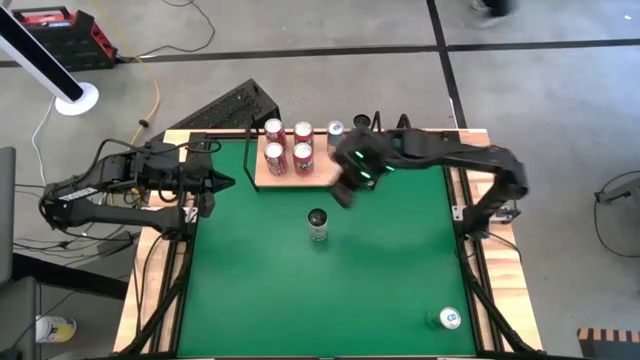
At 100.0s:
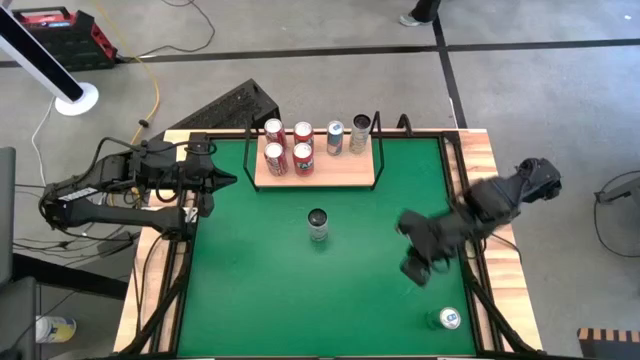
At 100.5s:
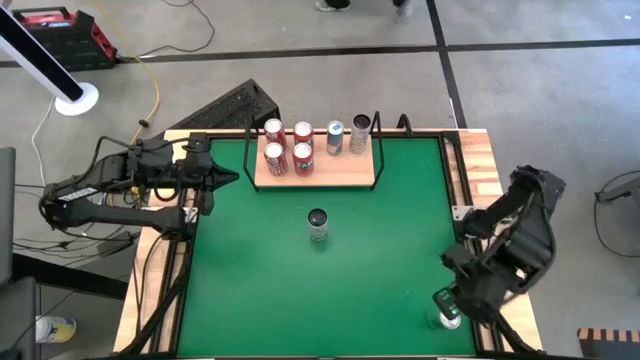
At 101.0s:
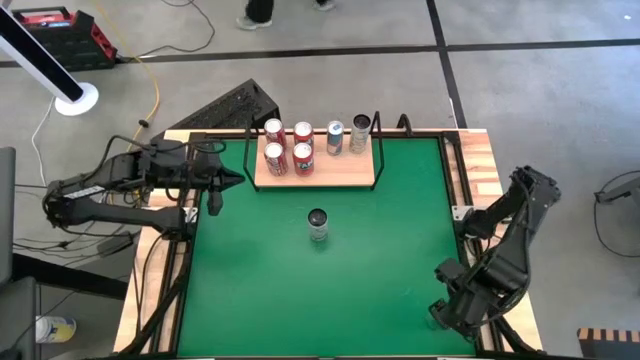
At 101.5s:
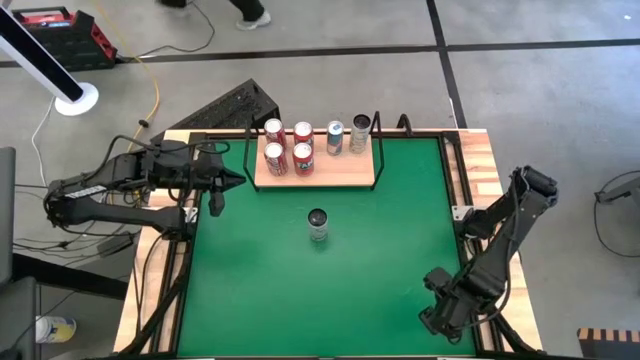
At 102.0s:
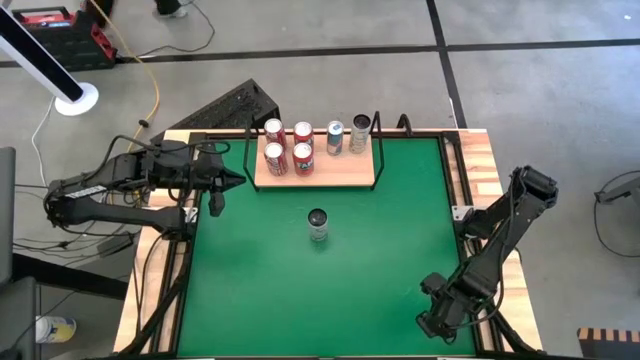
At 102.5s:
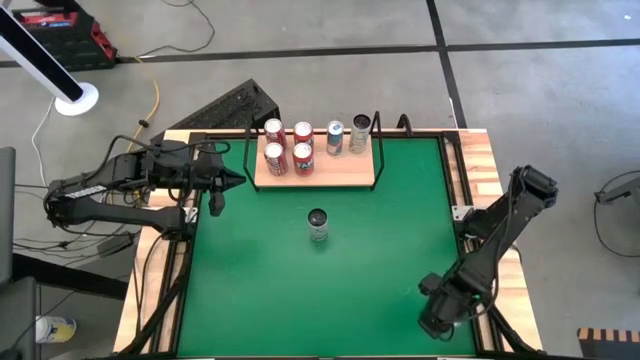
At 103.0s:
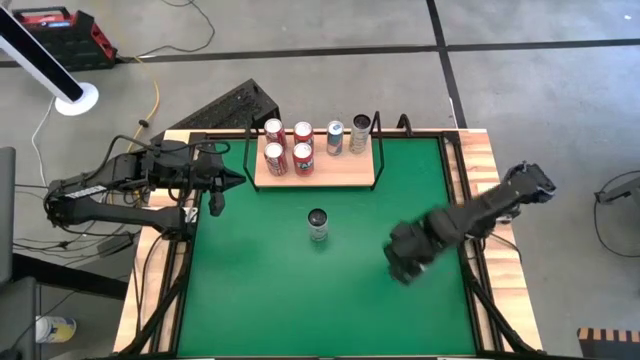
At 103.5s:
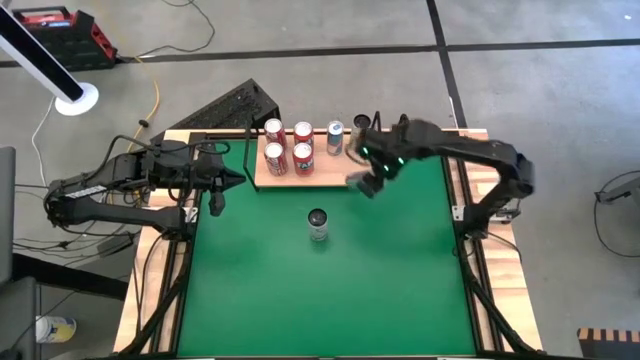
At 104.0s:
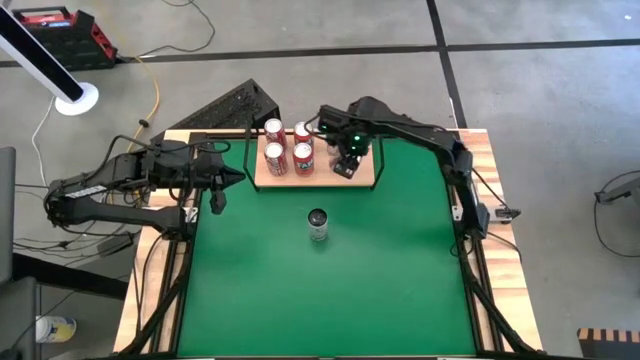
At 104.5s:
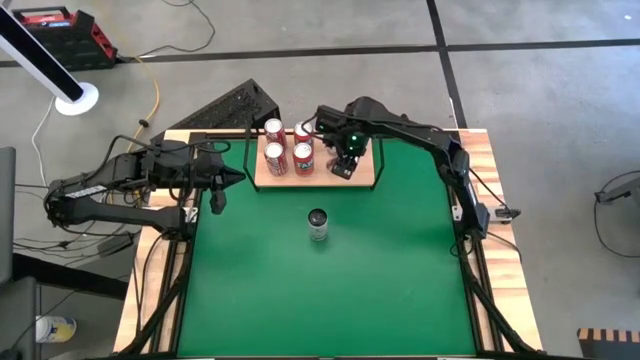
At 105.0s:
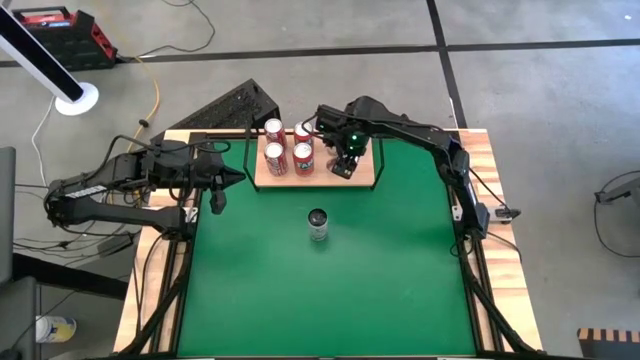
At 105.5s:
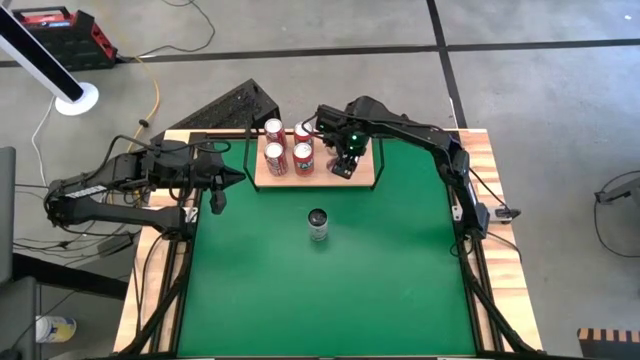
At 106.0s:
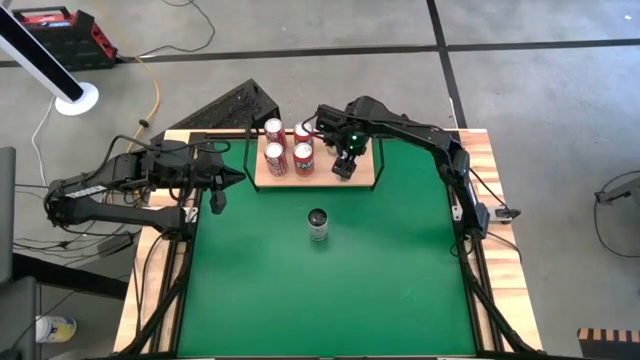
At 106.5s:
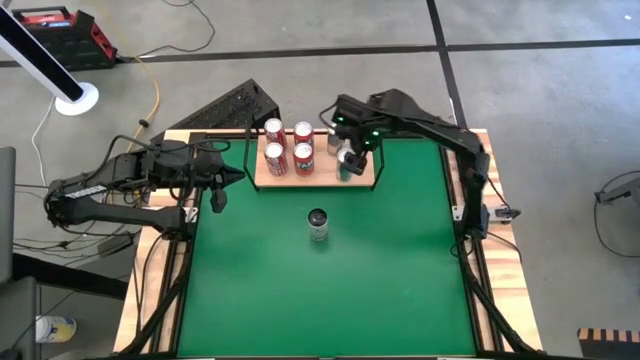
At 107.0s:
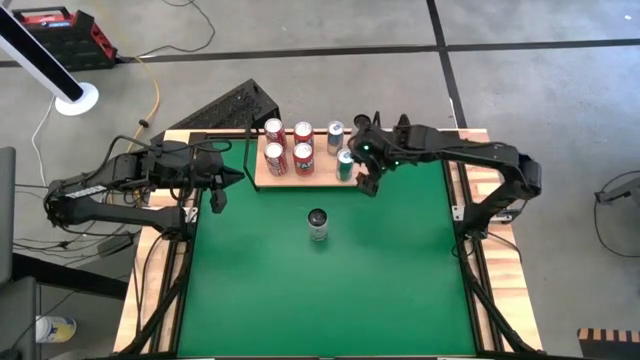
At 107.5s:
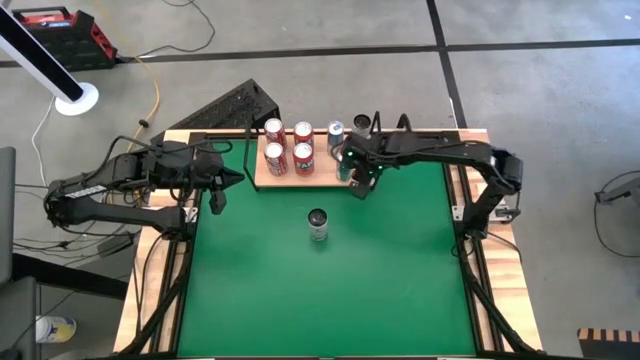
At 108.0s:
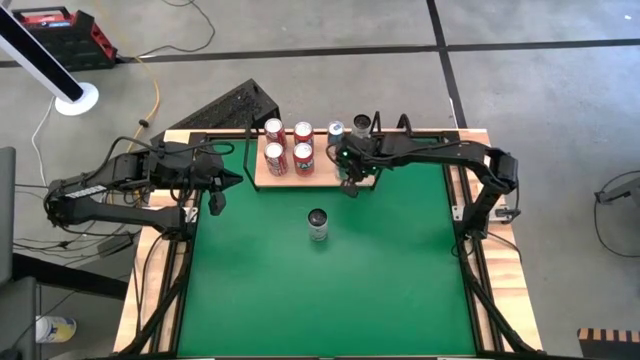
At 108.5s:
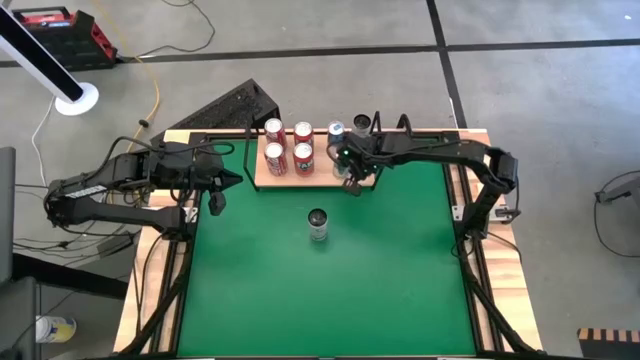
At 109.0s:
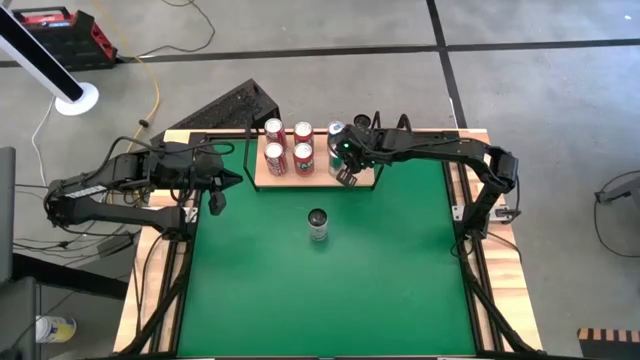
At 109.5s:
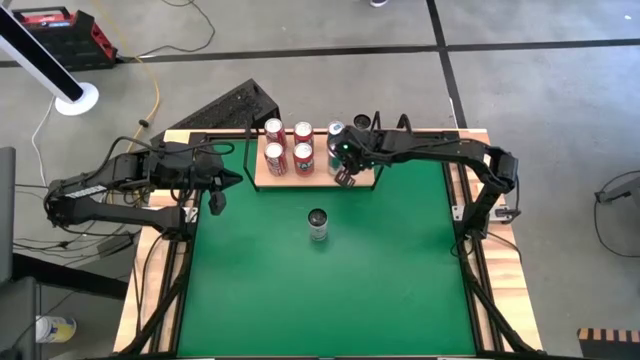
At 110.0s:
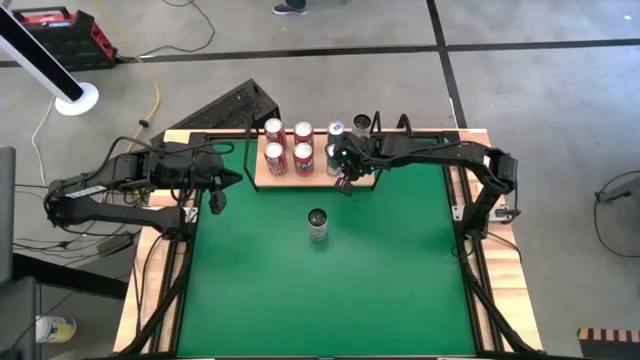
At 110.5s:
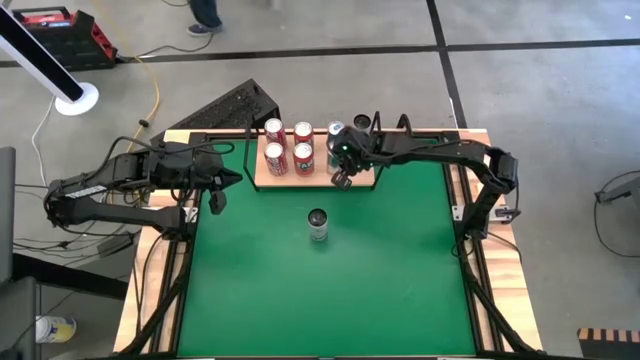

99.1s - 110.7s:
Task: Place canned beverage on shelf
Put the blue soda can on the shelf aligned with the other blue soda can

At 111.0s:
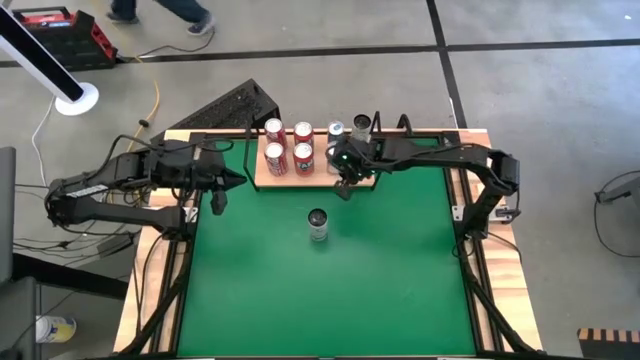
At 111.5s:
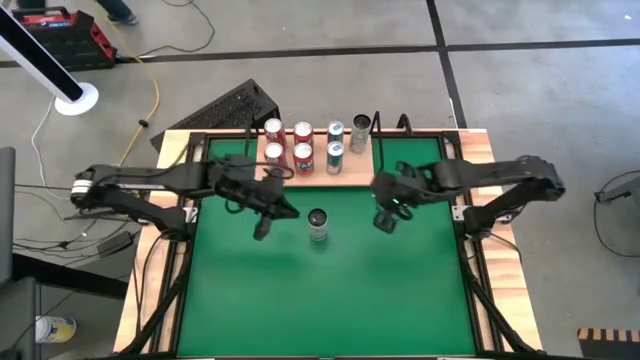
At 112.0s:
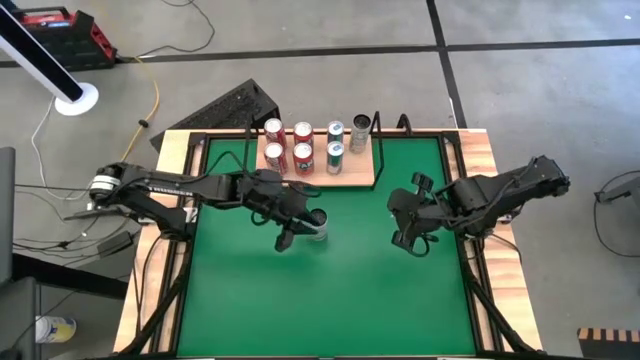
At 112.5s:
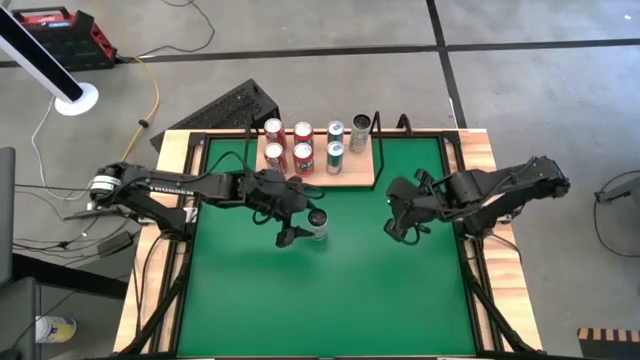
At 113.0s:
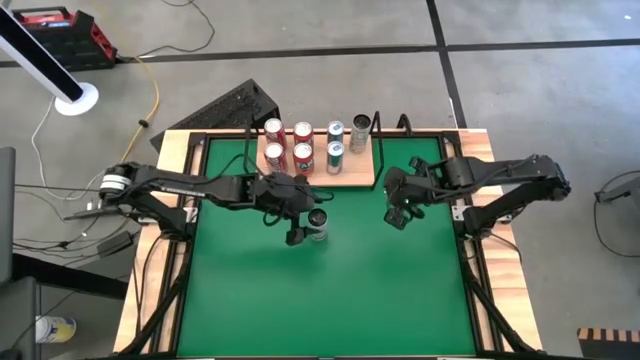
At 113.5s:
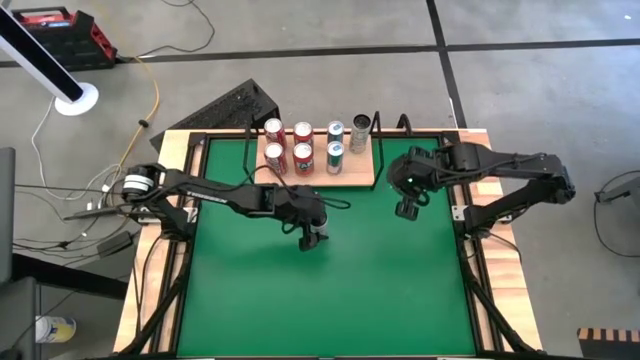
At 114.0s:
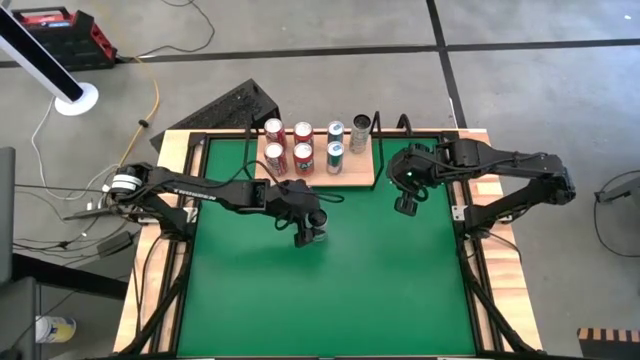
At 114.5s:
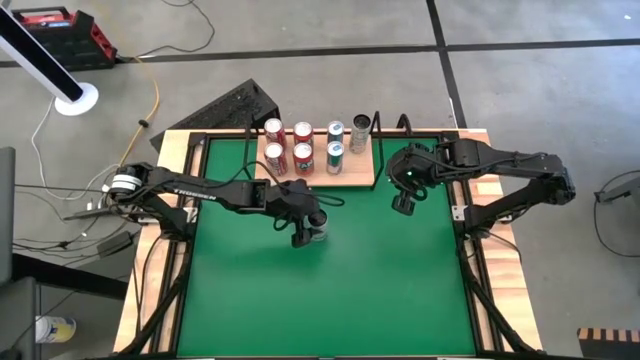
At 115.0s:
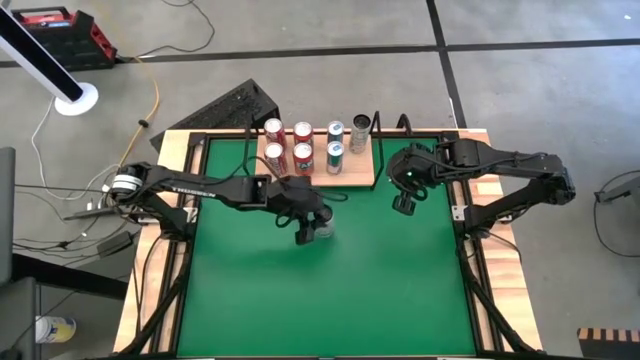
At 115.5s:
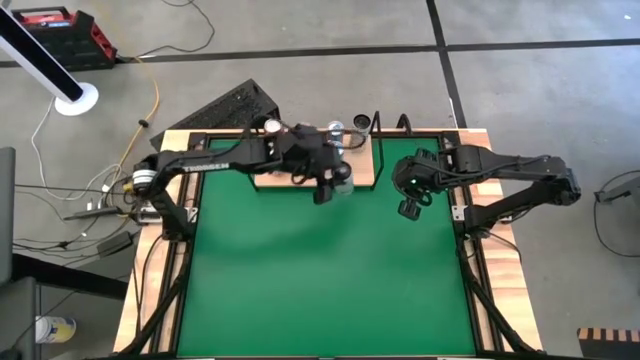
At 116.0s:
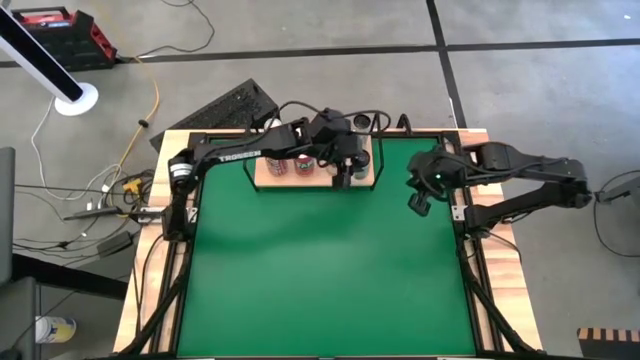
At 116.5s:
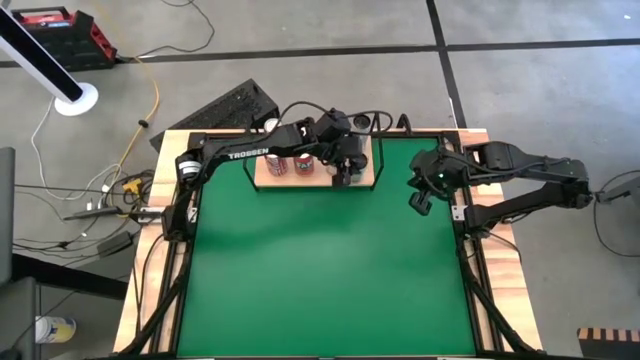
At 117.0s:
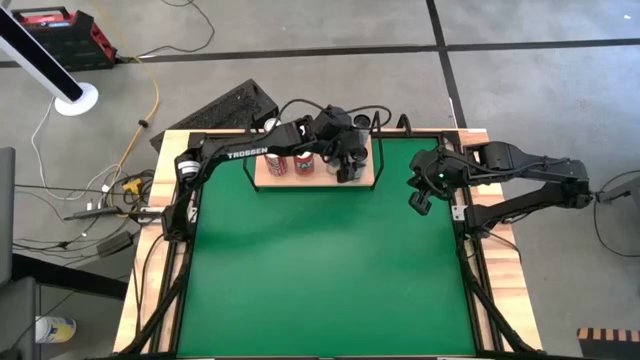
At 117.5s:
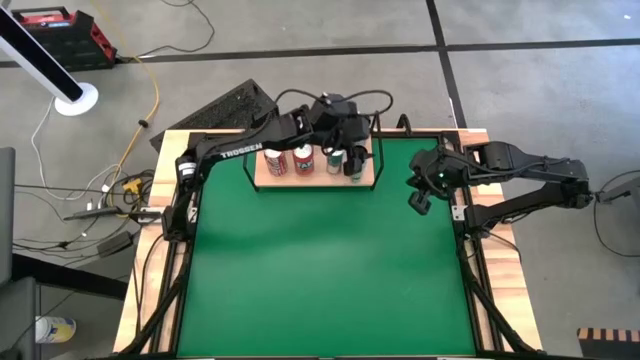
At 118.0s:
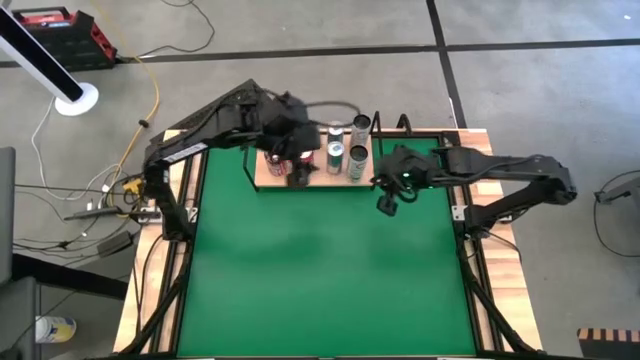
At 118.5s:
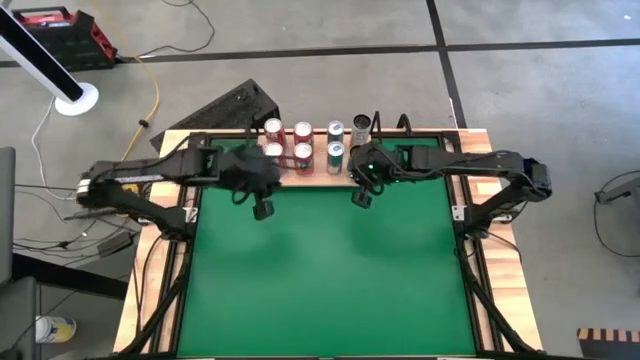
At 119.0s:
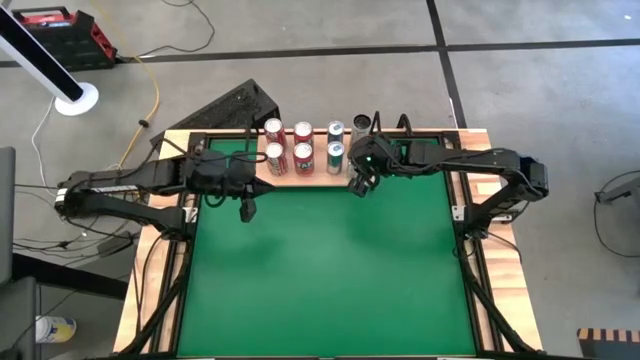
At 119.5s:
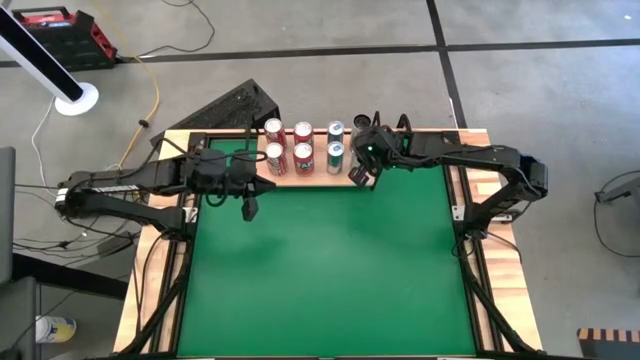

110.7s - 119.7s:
Put the white-yellow soda can on the shelf aligned with the other white-yellow soda can

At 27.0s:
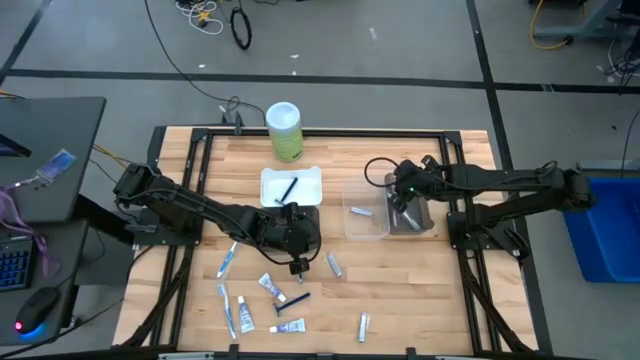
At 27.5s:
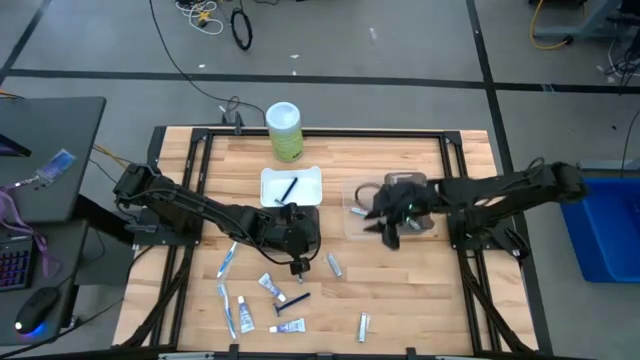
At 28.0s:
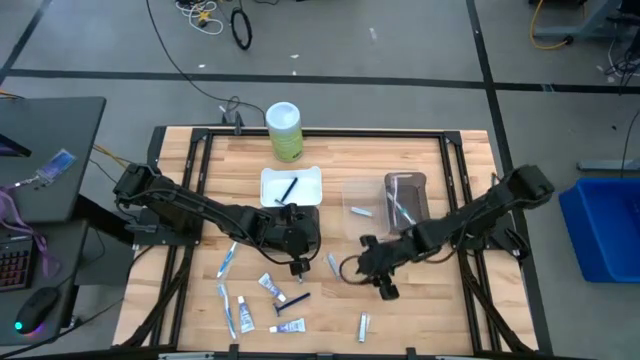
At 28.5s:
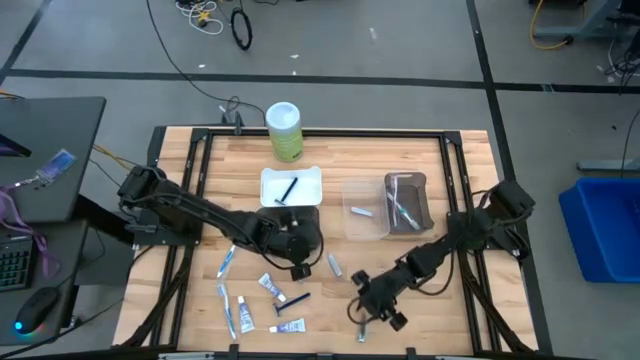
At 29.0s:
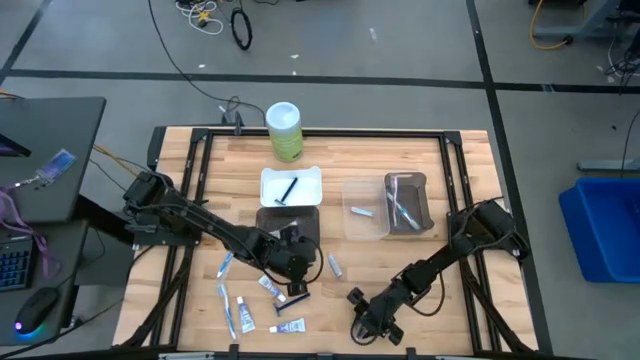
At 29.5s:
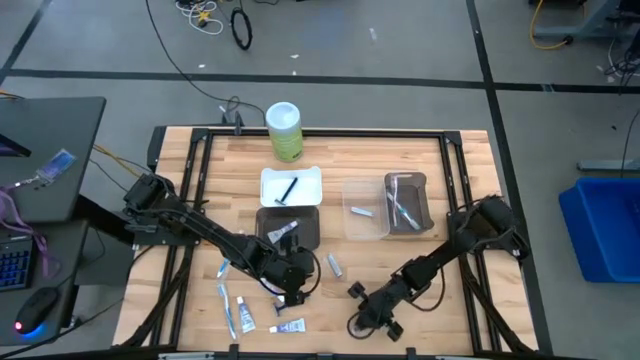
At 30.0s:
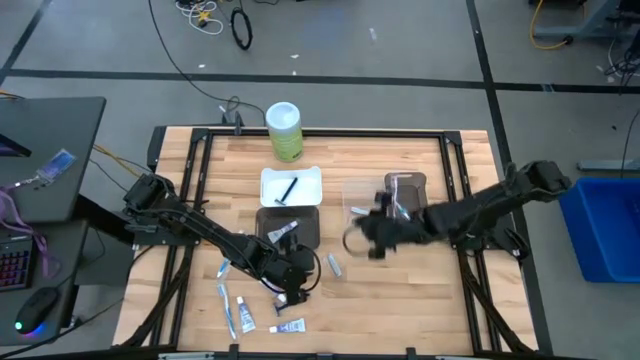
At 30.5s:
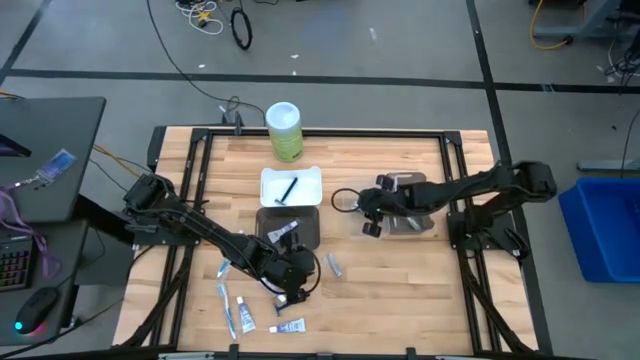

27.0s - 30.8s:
Task: Pick & Place Travel size toiletries
Put the silver nail cutter into the transparent bin
